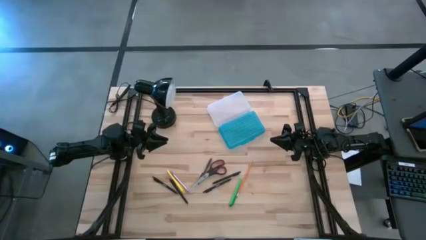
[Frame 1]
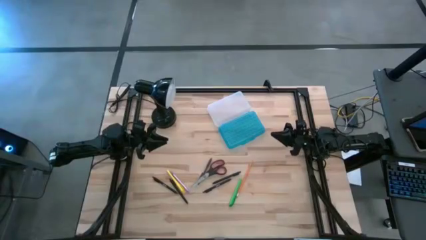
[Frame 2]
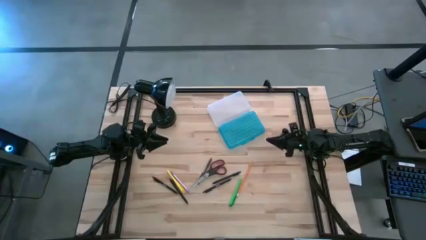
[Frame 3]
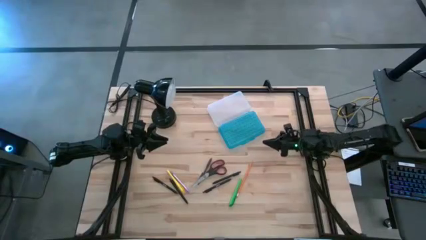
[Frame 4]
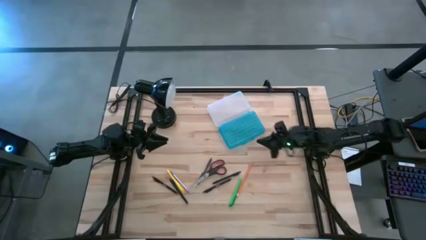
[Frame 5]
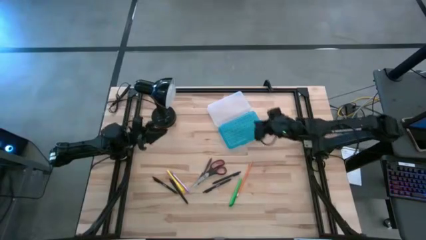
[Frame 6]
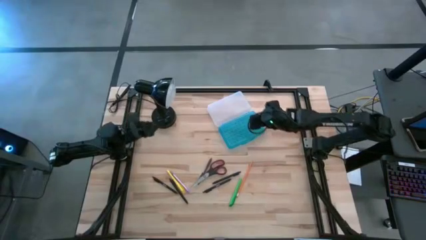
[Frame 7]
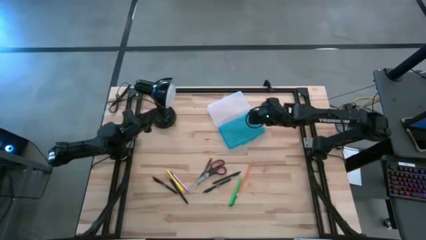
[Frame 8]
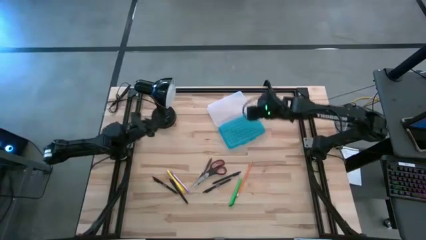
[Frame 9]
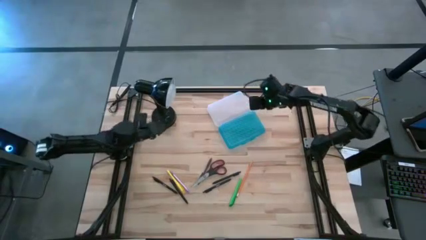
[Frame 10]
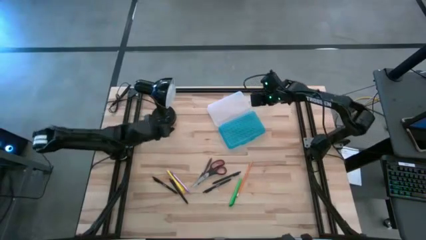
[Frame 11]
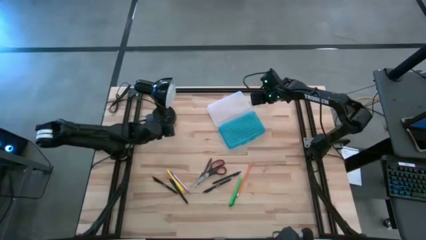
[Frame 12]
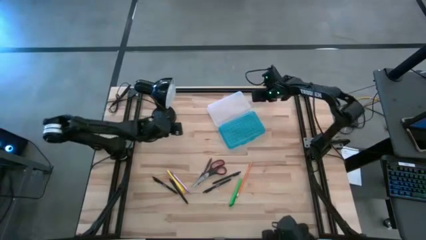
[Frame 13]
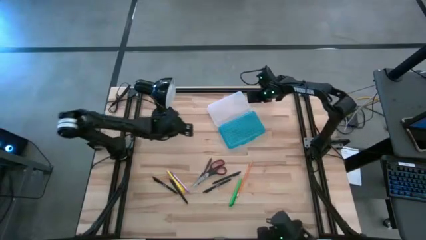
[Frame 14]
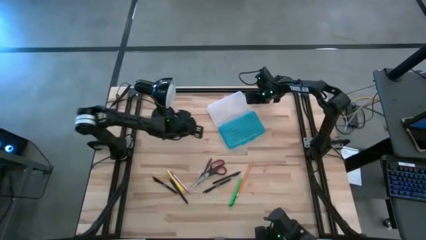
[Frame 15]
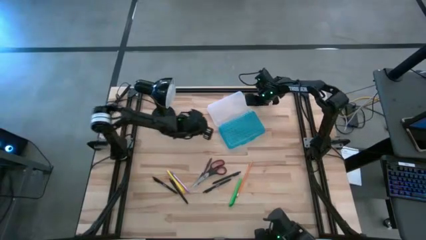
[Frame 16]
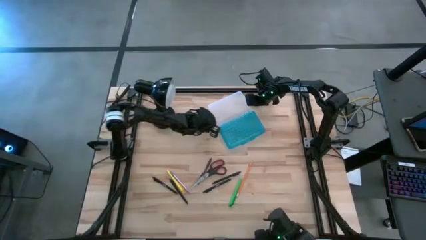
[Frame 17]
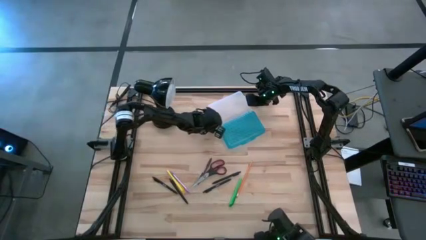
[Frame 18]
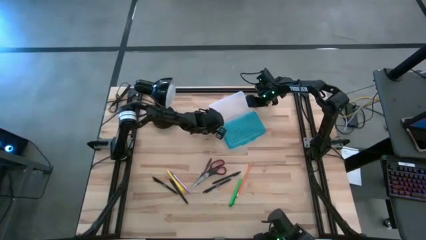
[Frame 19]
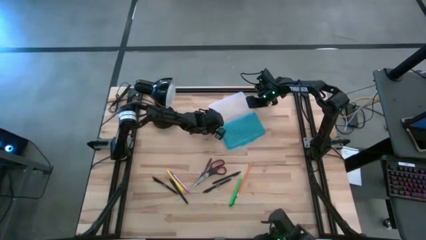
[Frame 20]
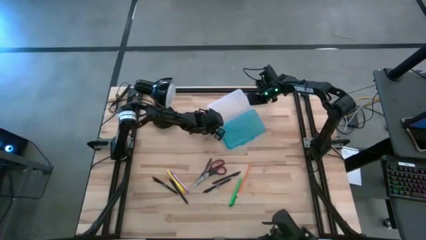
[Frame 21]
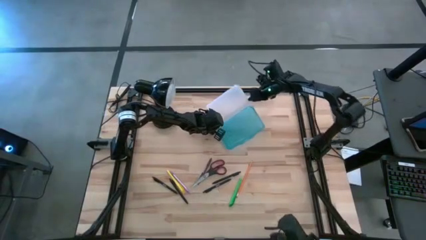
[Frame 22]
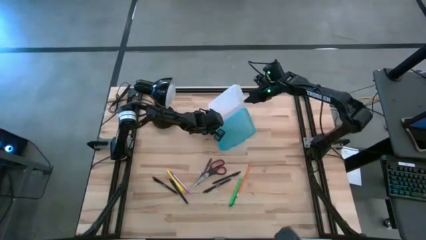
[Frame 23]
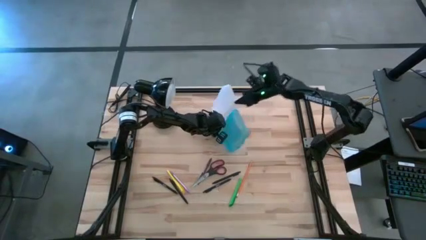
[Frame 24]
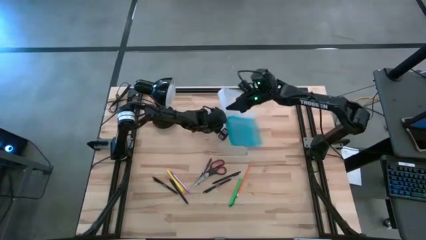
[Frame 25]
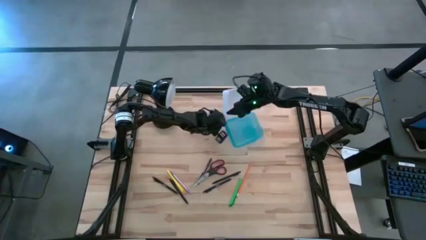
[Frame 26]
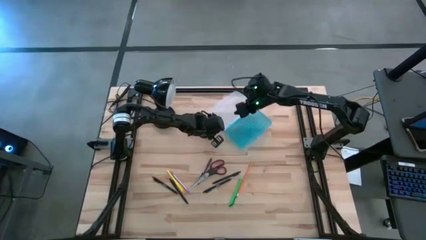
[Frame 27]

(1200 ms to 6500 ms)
Task: Pick & place school supplies into a supply box
Put the supply box face up on the table

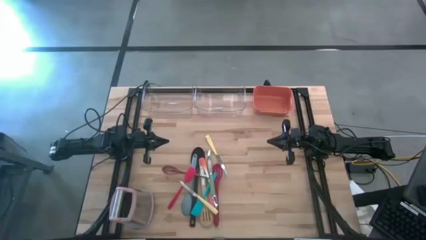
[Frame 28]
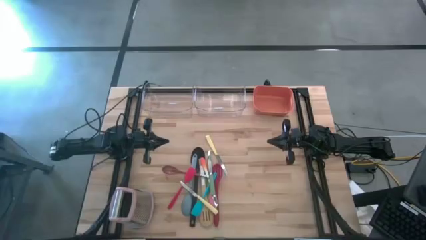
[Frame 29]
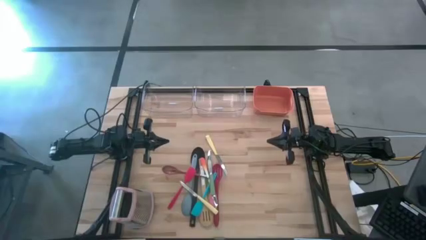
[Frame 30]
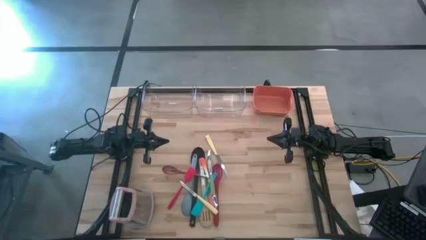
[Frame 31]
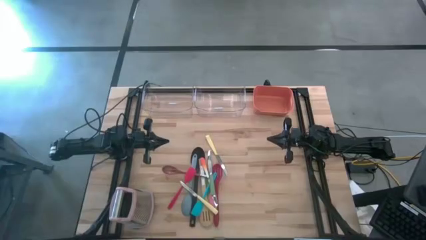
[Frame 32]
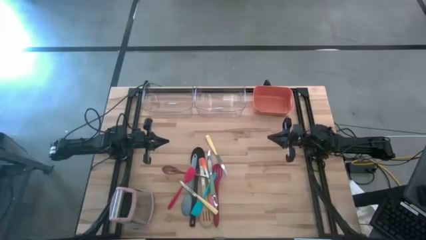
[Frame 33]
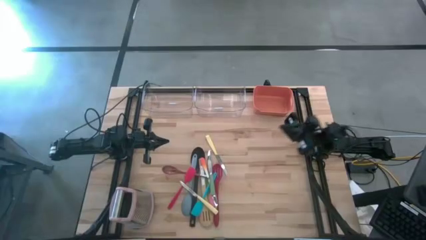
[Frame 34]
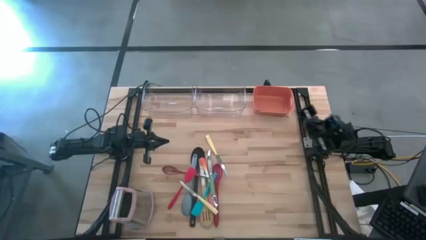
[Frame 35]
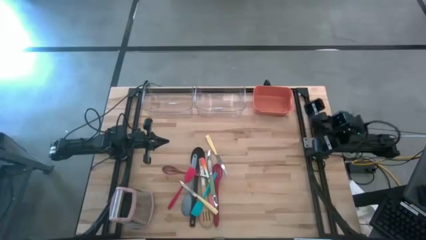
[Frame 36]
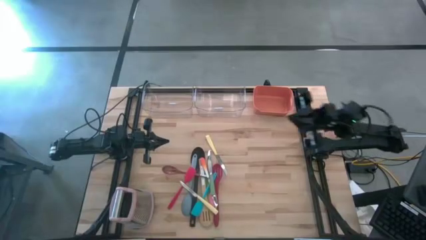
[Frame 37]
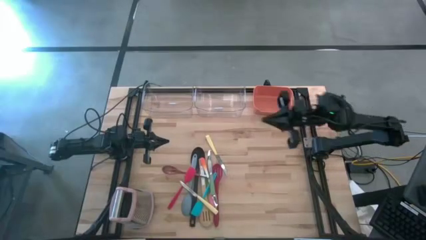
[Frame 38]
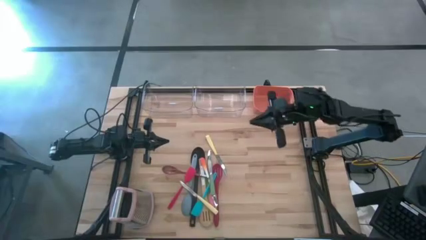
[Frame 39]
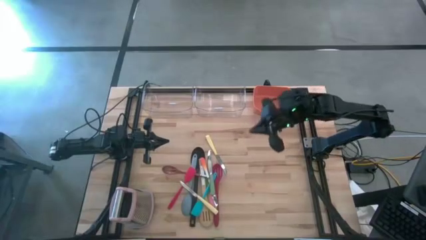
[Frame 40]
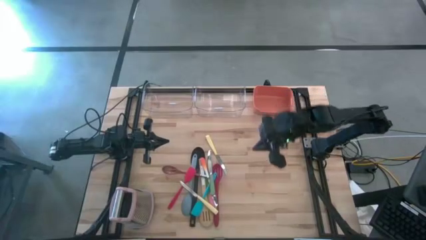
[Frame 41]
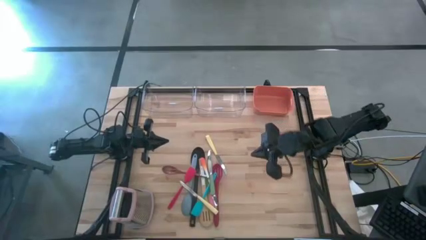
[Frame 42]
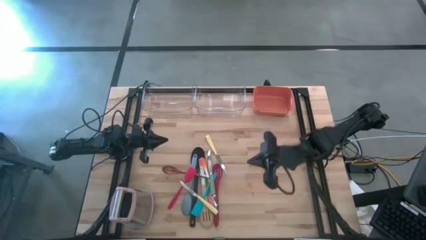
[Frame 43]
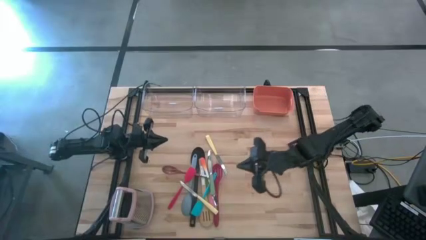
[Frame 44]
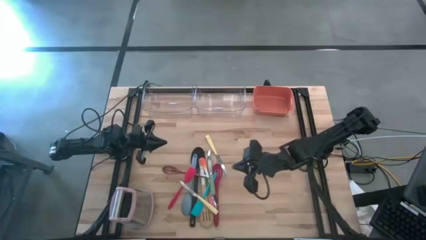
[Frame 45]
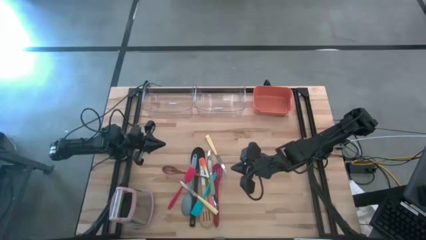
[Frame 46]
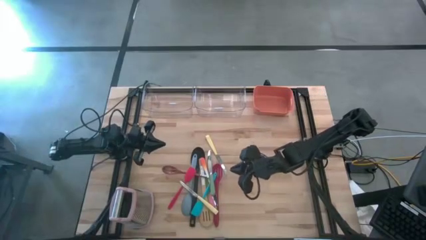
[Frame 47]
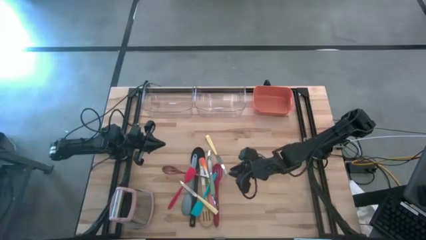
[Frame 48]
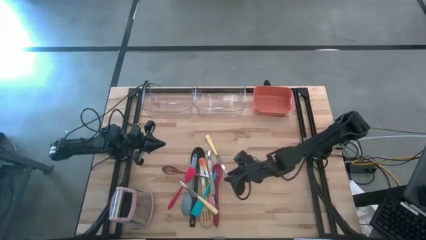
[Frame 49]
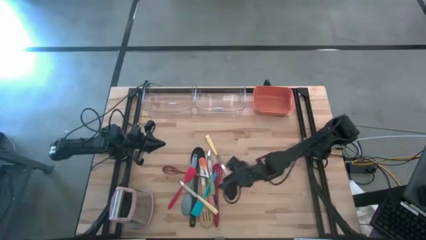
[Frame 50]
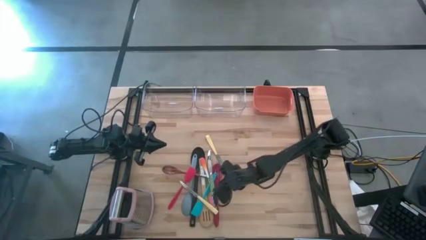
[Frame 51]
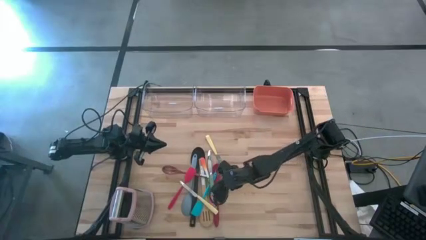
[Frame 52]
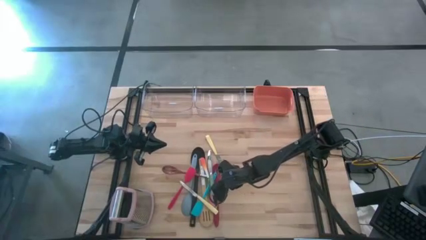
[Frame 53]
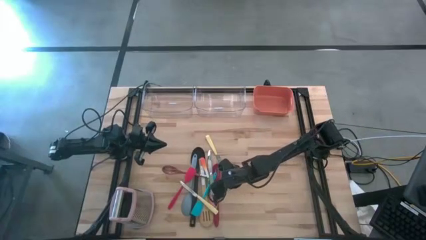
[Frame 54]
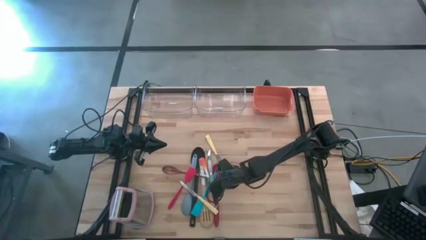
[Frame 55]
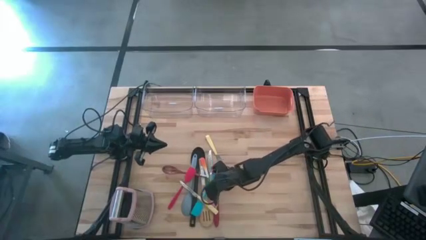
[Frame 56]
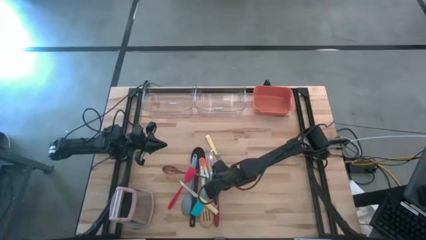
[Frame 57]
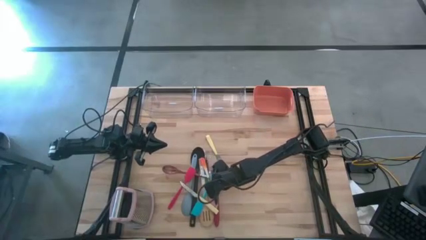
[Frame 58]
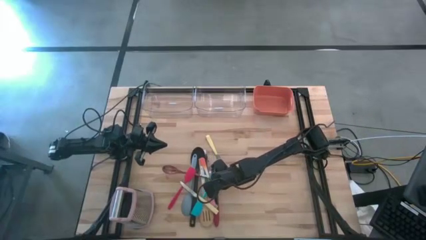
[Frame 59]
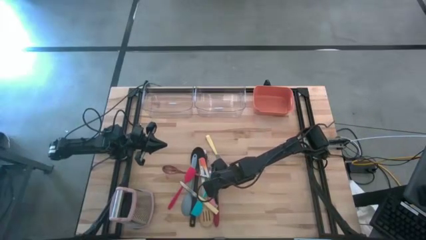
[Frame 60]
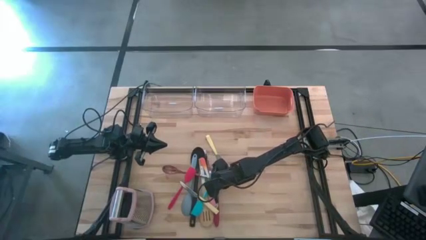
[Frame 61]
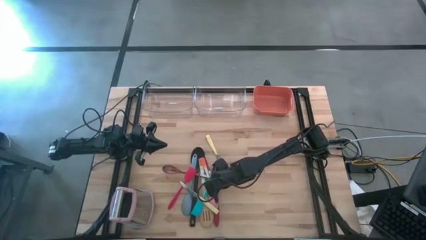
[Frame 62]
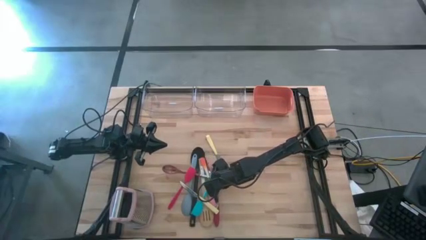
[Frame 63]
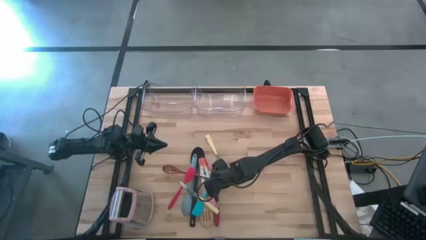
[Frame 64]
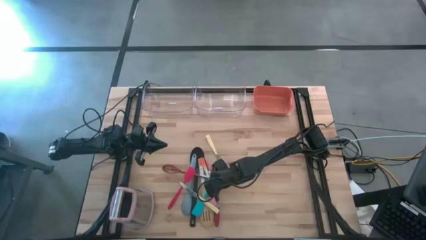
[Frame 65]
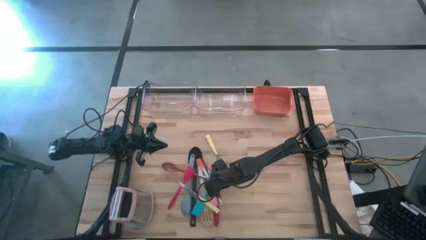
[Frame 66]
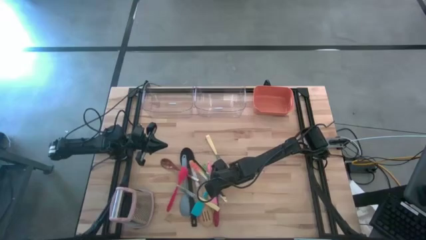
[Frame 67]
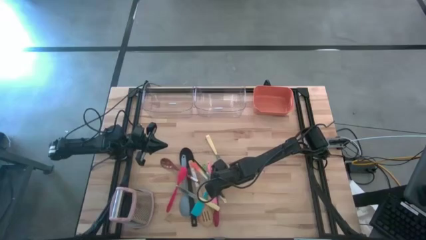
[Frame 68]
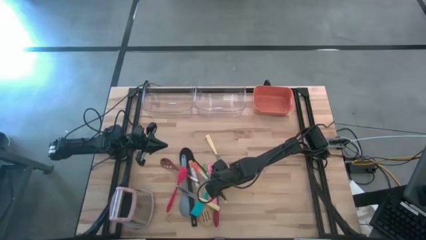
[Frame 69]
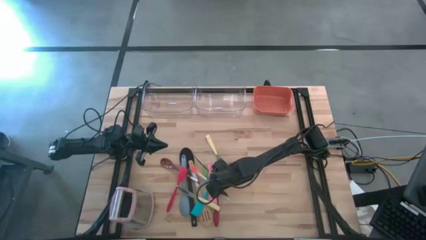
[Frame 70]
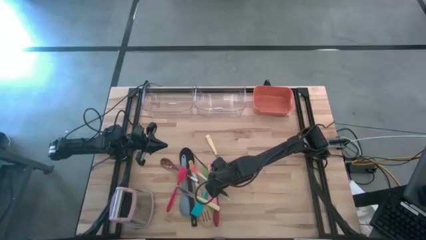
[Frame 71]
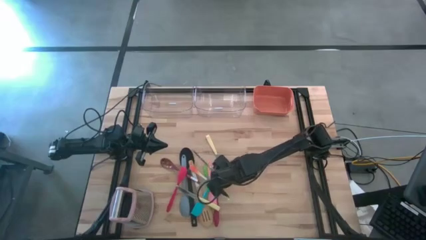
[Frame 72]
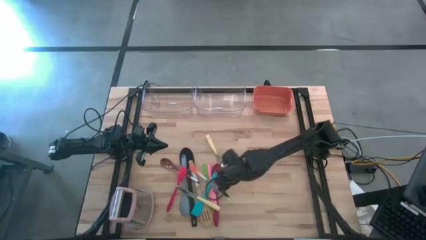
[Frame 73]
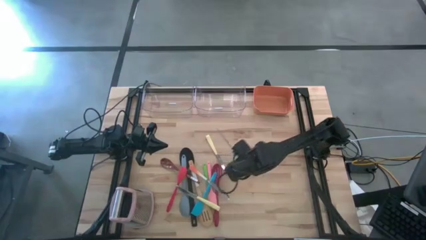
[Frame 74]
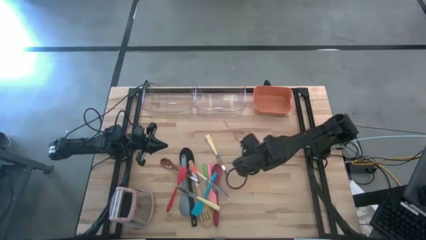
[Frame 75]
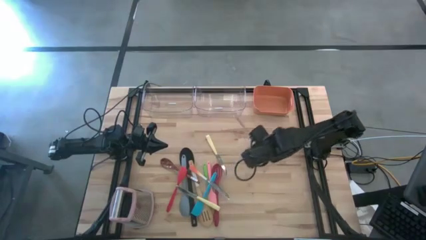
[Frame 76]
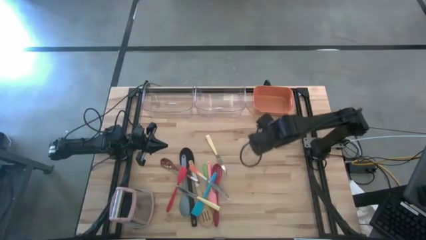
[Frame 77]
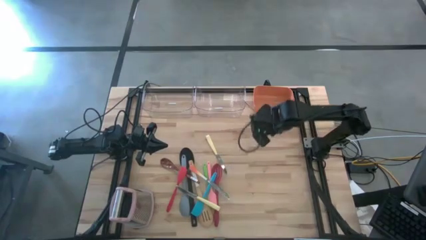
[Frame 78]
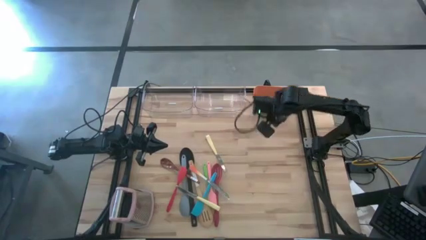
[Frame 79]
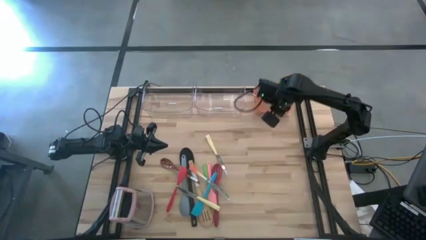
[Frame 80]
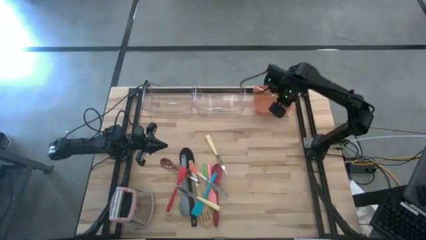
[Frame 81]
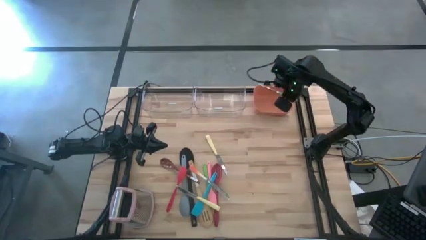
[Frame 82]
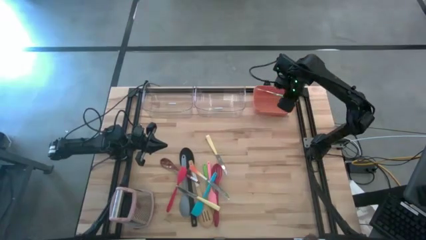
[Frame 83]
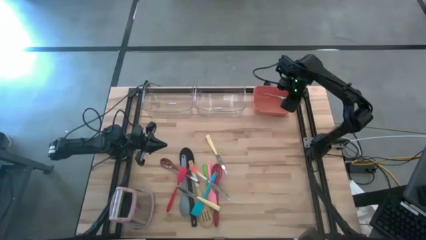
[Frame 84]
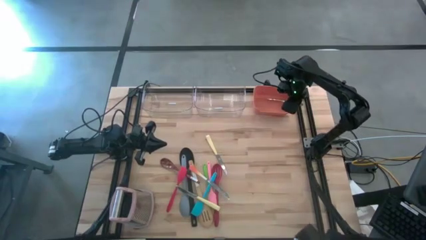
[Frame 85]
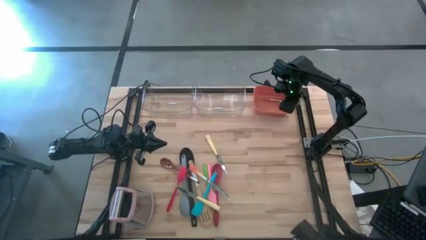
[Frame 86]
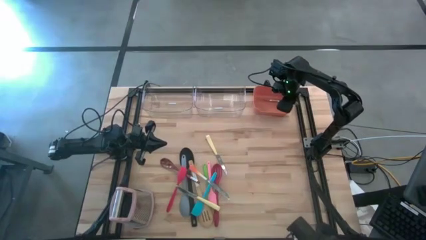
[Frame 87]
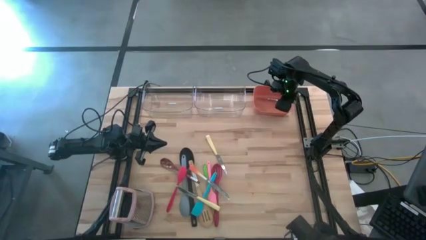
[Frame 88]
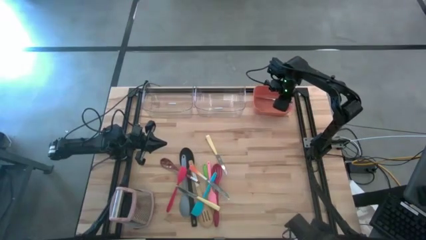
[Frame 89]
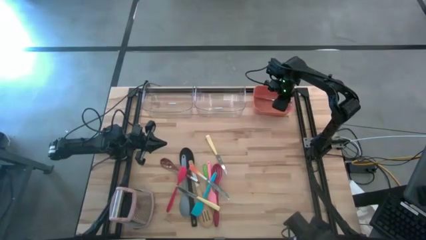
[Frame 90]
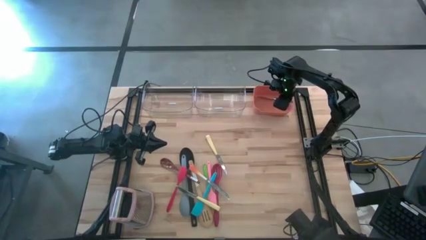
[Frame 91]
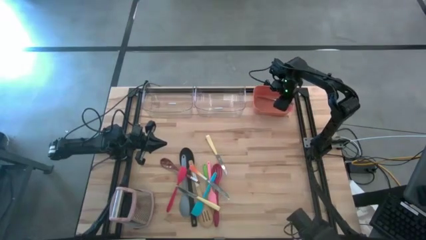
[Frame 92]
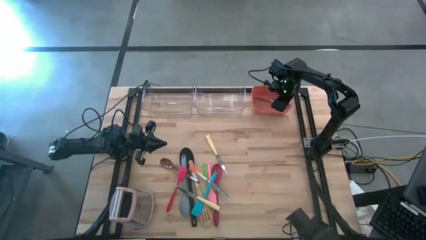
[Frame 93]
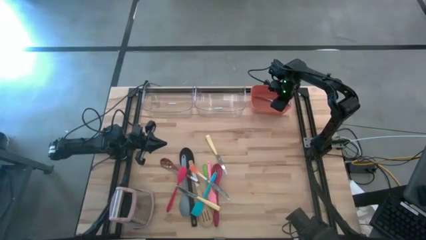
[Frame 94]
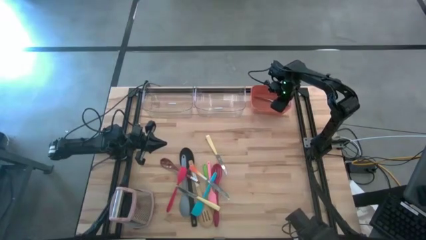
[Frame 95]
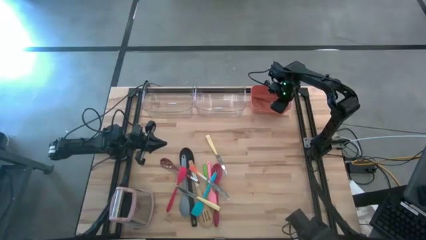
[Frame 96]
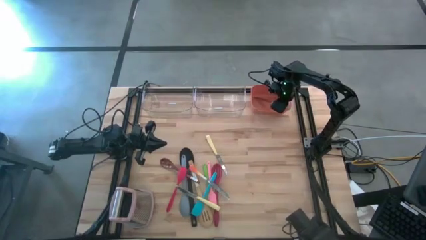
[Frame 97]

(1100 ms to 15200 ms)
Task: Pick & Place Kitchen Items
Put the blue knife into the orange bin
